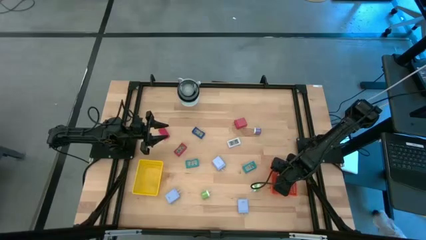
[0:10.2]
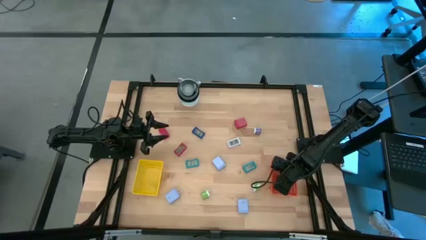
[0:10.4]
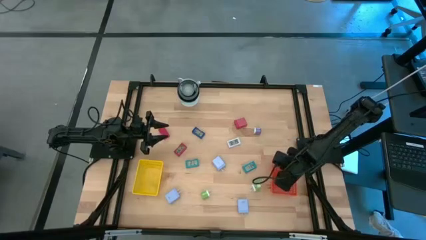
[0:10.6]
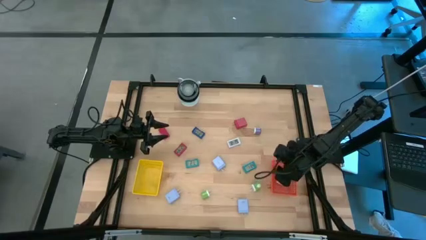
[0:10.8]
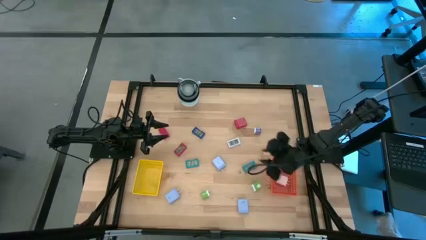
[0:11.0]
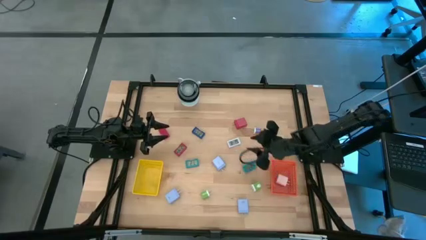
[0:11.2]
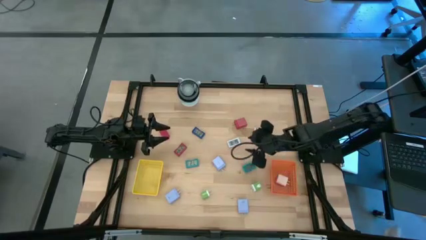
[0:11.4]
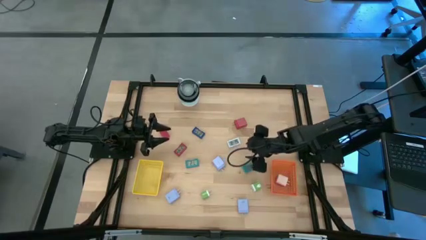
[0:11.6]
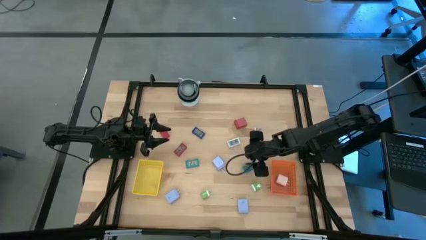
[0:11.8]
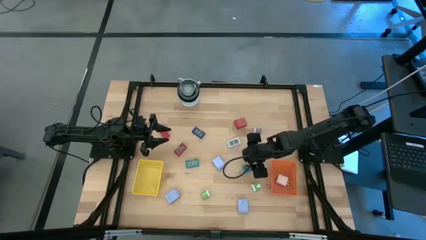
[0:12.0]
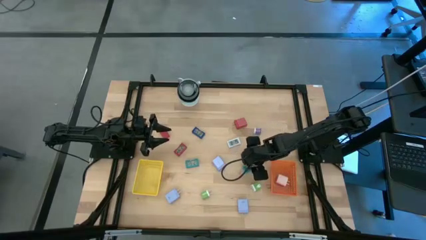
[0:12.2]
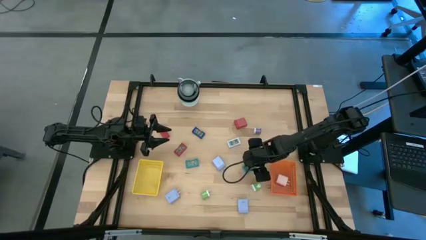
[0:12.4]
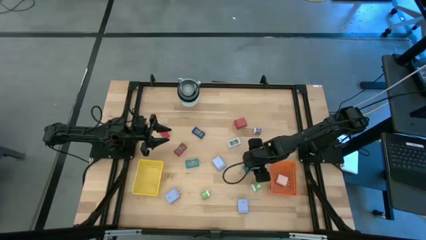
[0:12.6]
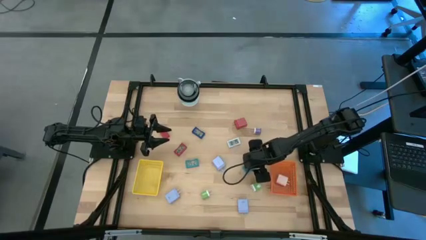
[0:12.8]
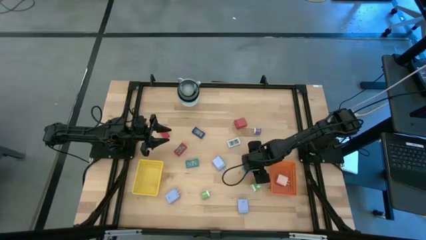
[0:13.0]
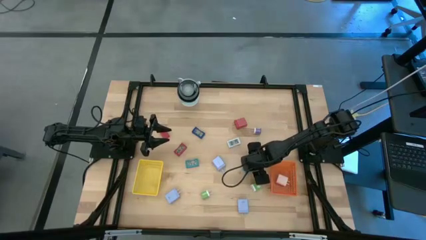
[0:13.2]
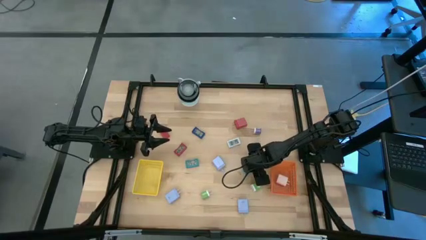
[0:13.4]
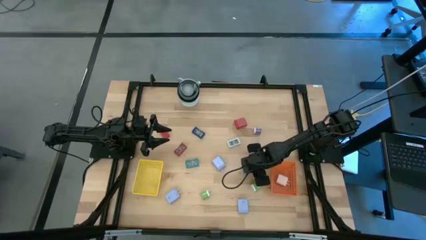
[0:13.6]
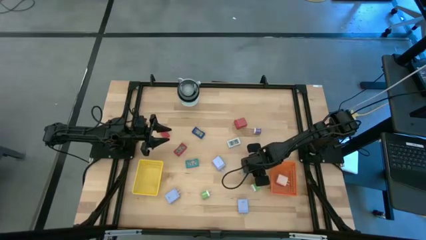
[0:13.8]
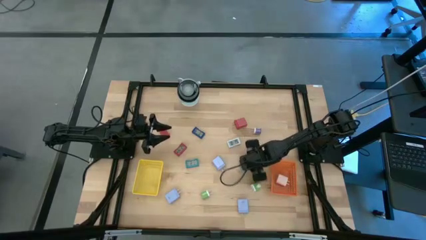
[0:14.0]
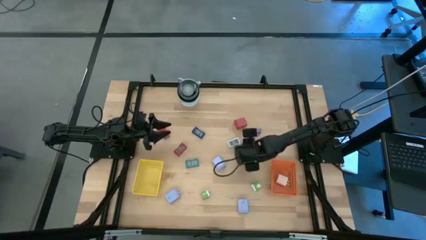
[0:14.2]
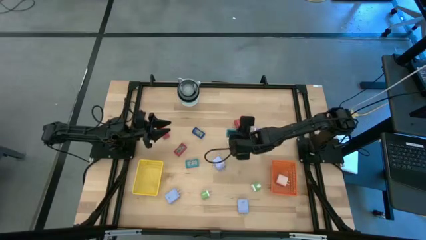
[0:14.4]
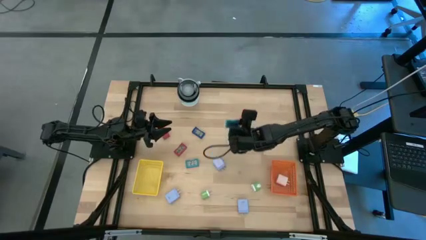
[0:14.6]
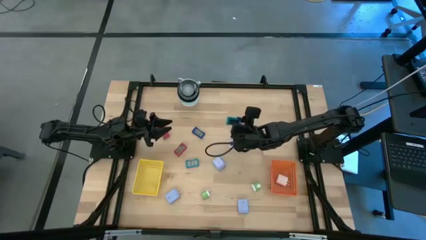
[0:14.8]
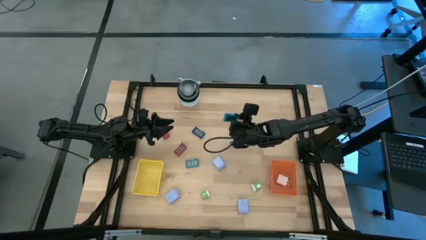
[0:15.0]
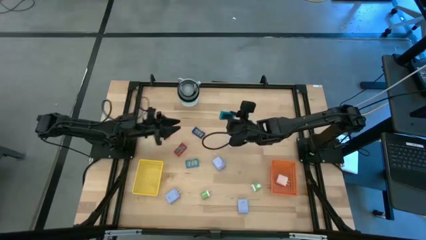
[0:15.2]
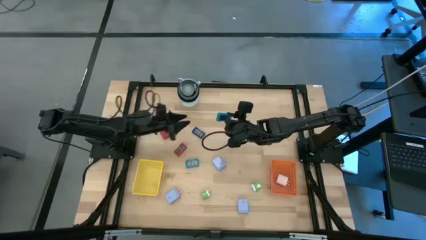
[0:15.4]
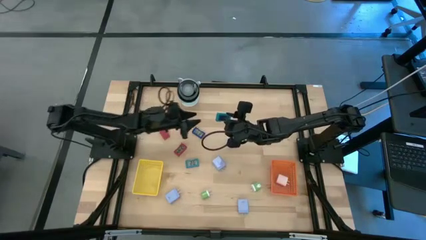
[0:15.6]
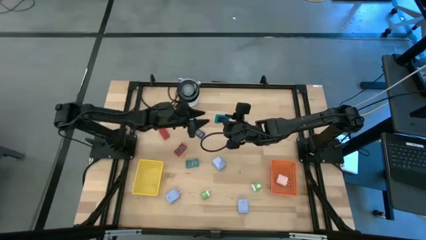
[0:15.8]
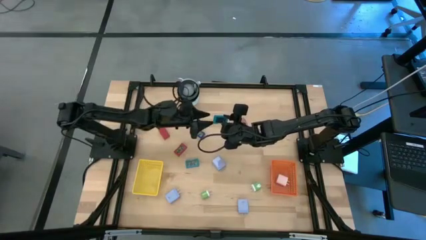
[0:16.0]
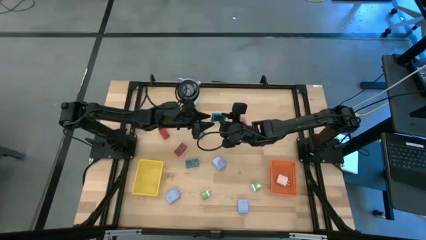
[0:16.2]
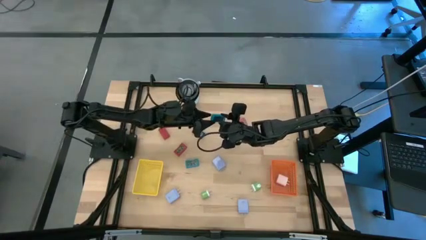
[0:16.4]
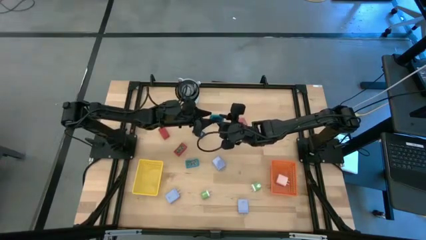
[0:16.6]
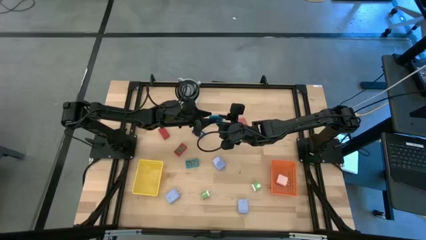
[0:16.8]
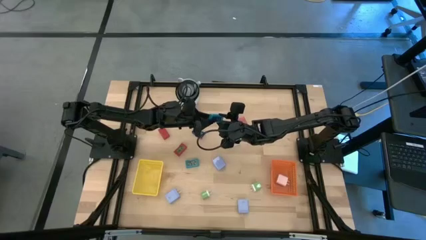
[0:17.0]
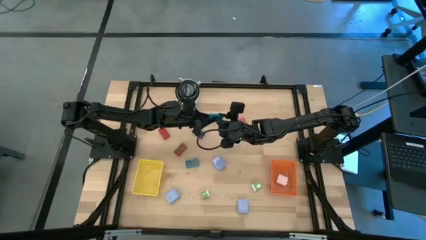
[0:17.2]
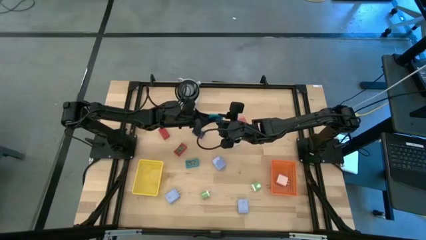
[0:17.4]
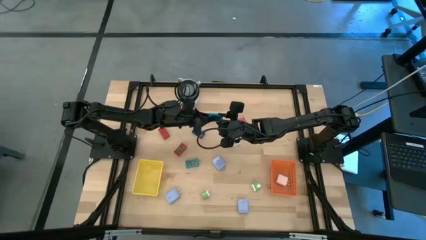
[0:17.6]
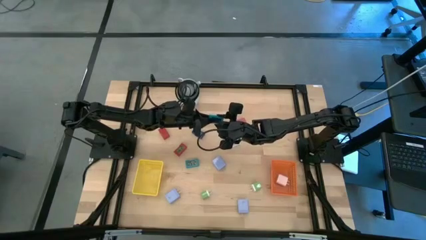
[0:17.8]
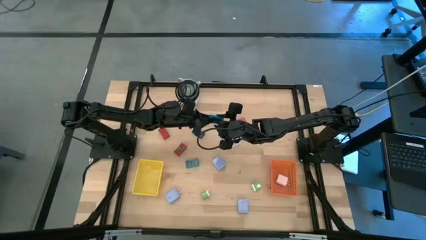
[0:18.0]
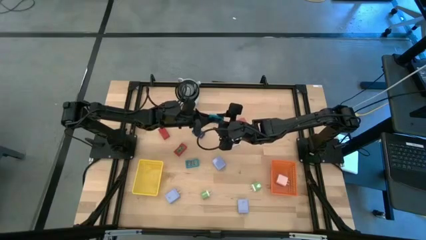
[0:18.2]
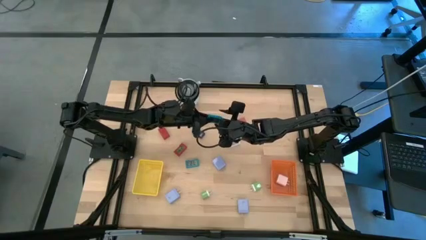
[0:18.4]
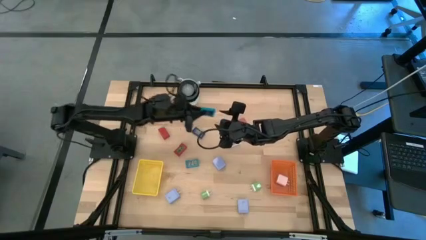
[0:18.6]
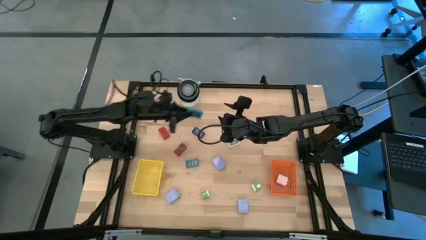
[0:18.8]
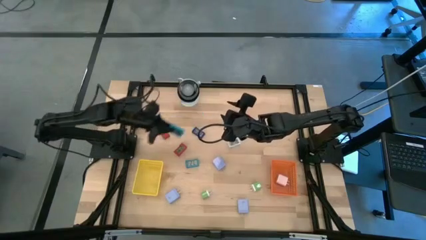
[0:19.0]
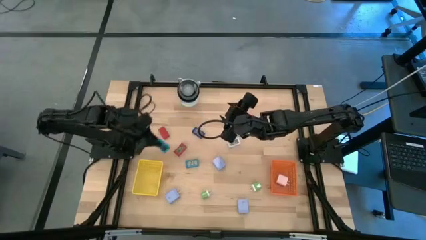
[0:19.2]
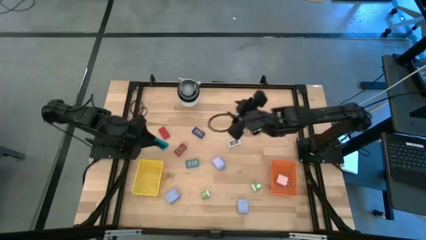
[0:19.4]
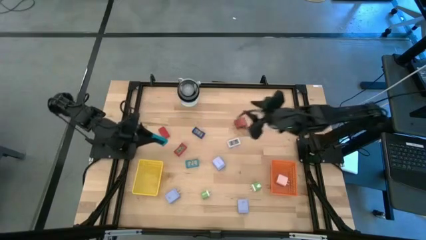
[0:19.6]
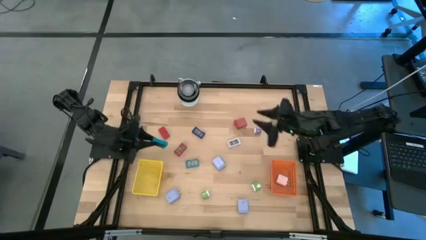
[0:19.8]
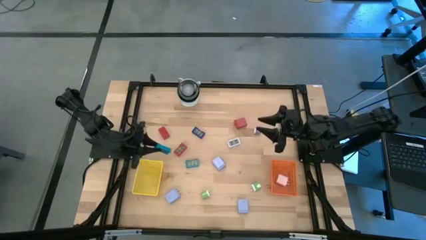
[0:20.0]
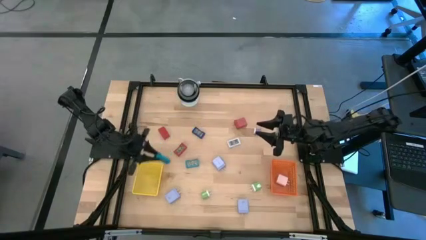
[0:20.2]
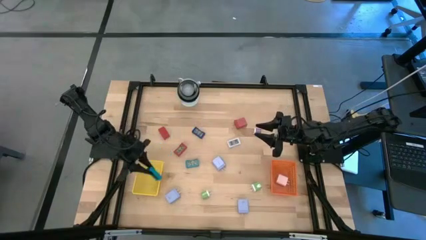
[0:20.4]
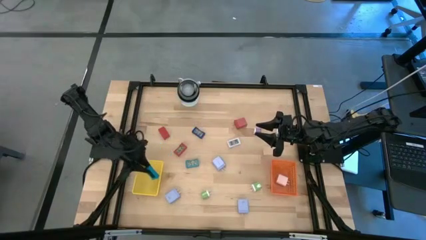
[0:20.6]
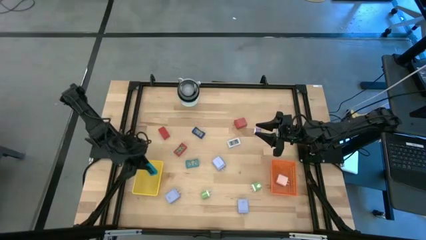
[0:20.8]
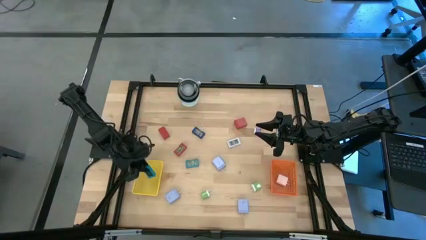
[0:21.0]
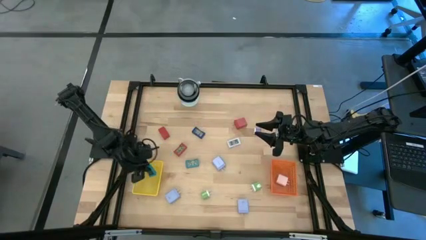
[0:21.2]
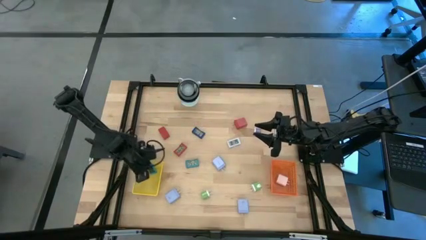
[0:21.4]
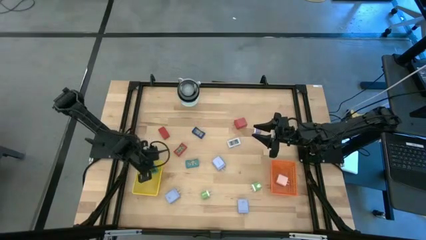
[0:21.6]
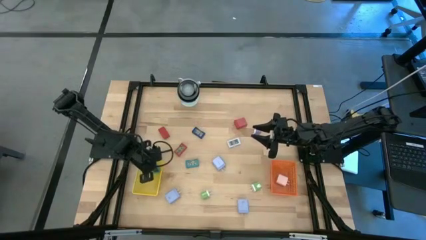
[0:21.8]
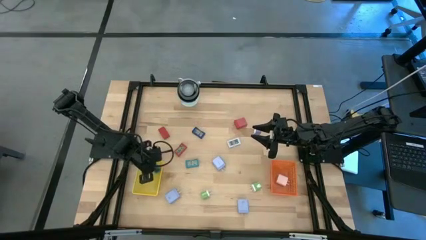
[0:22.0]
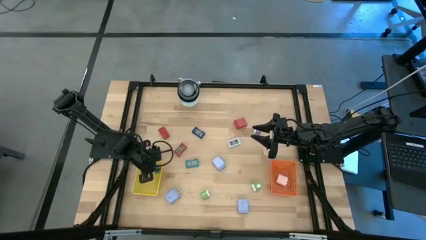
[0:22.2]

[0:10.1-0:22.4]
Task: Pick & Place Office items
Put the light blue digital timer into the yellow basket

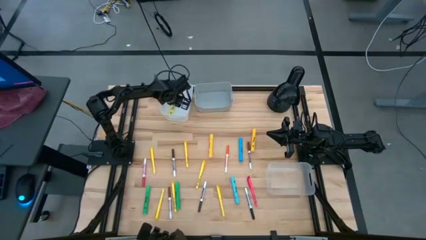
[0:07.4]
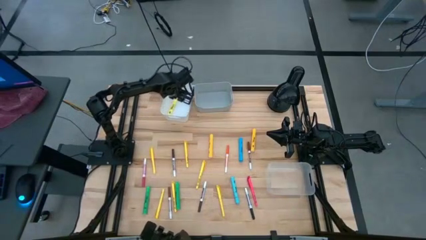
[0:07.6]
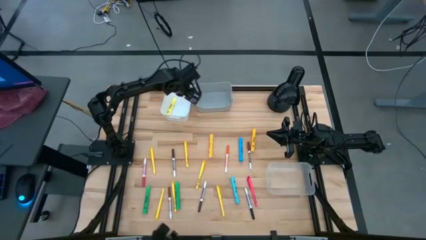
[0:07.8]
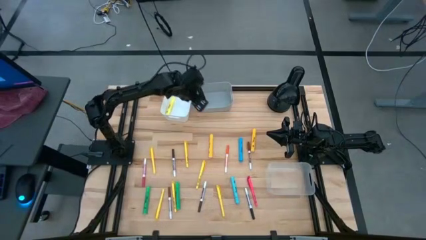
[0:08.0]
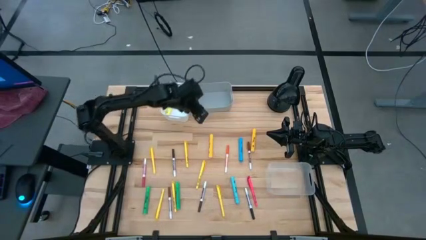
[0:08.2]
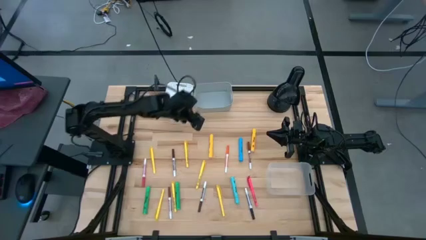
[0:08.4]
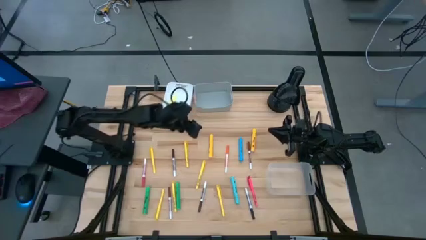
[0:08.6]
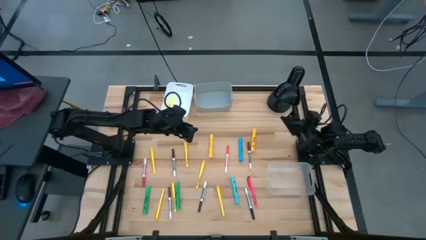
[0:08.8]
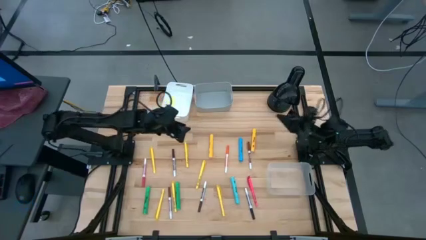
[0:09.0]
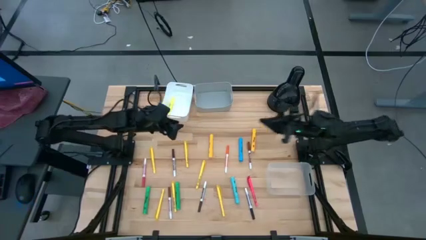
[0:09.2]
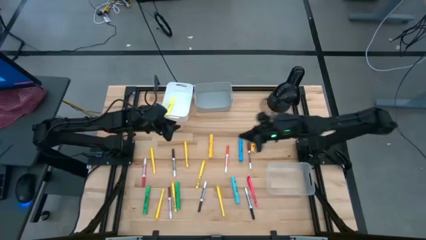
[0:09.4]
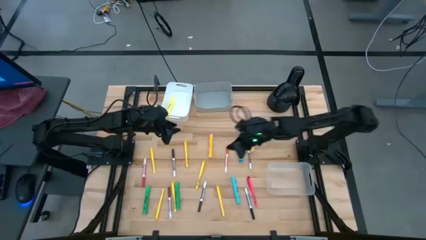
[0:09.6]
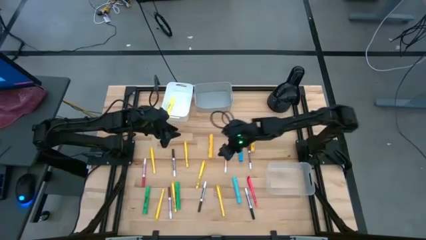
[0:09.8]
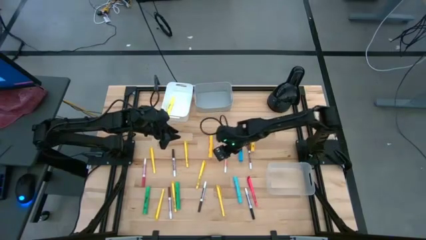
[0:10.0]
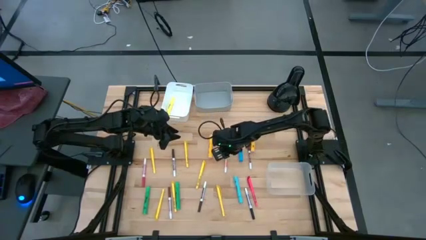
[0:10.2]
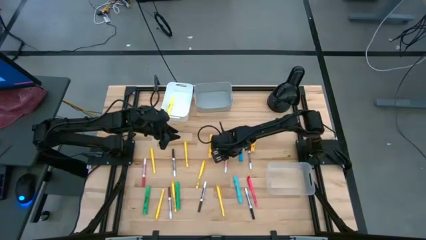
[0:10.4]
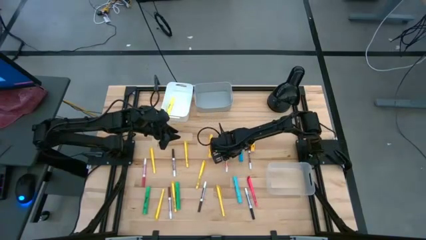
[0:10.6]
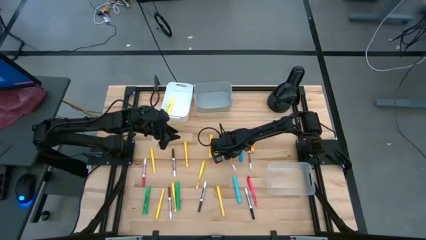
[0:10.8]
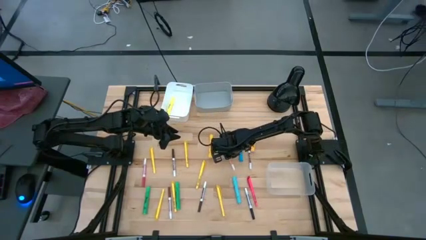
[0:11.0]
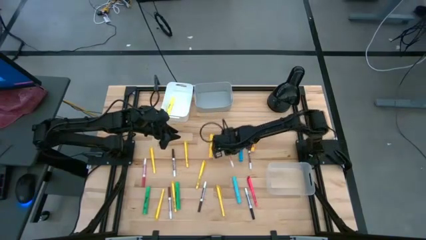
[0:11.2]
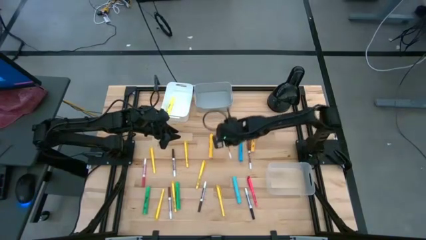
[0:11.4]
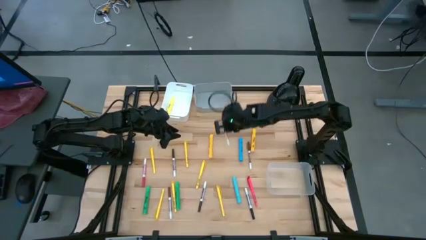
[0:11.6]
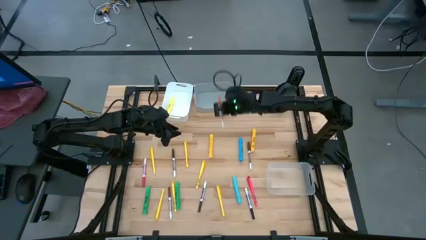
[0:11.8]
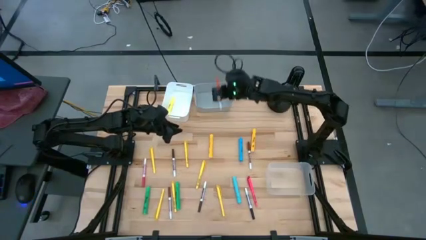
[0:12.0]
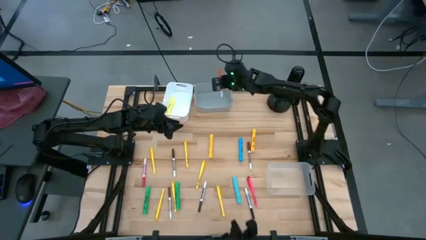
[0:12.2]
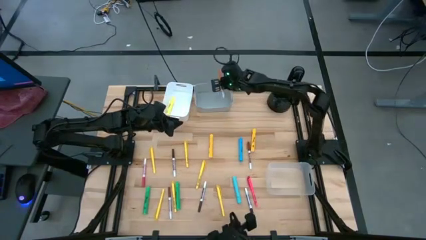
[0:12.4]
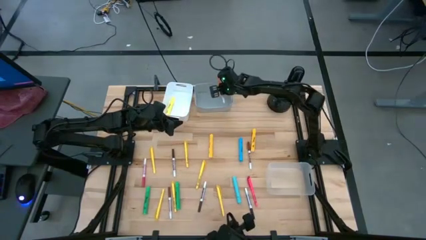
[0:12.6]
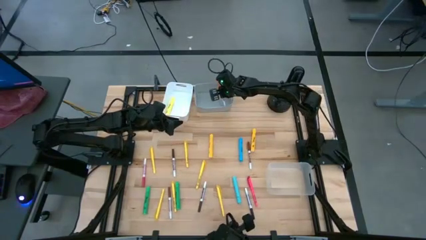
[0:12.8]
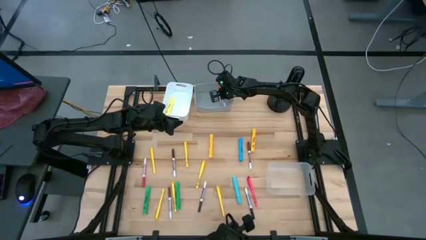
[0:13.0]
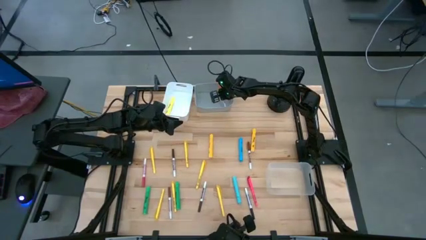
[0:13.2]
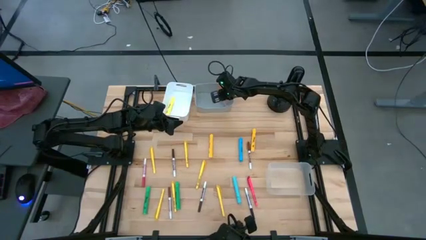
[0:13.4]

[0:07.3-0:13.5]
Task: Pick & Place Markers
Put the orange marker pen into the gray bin
